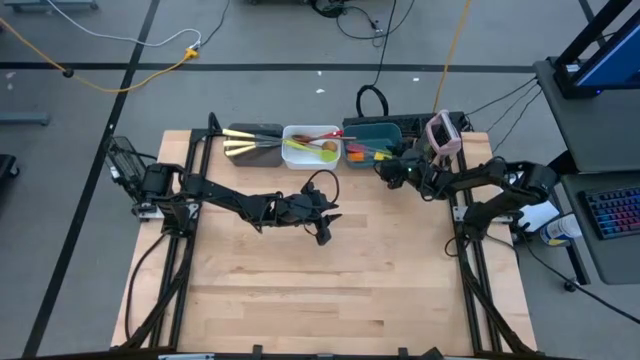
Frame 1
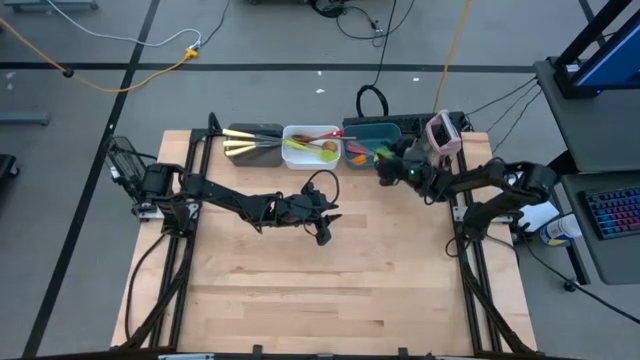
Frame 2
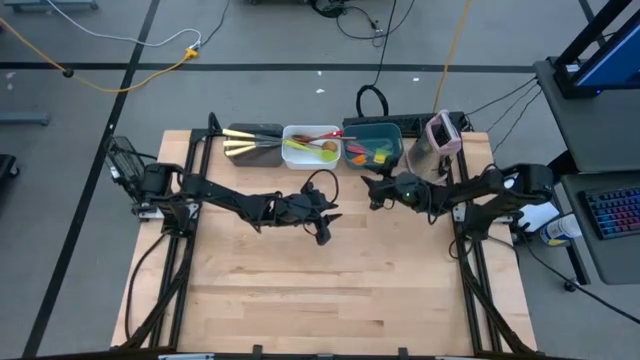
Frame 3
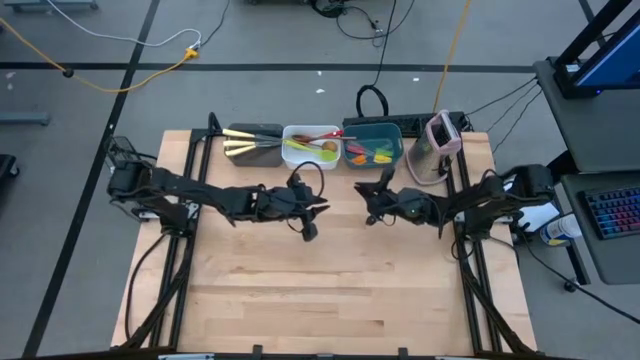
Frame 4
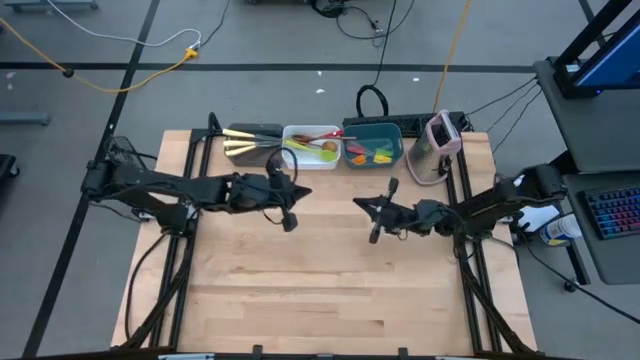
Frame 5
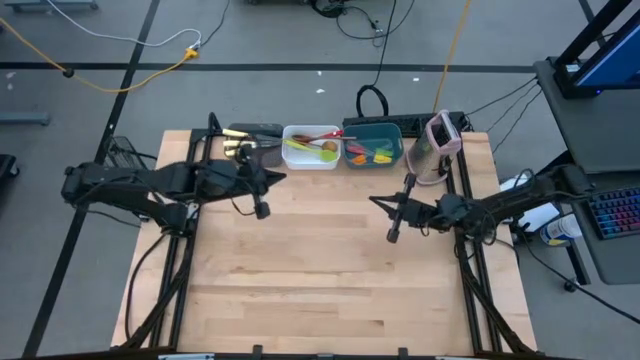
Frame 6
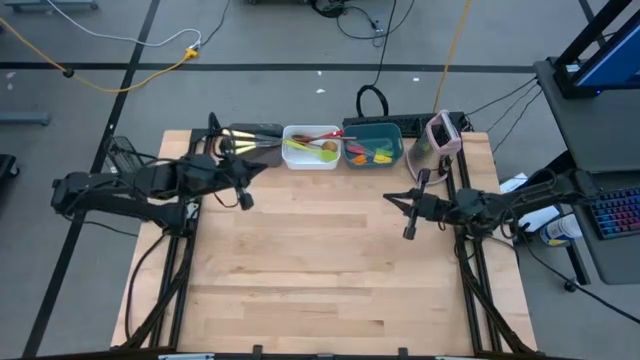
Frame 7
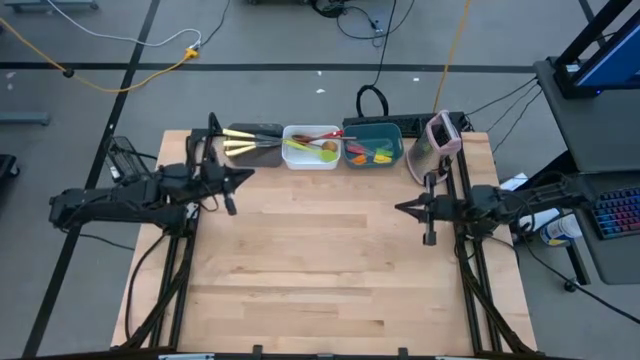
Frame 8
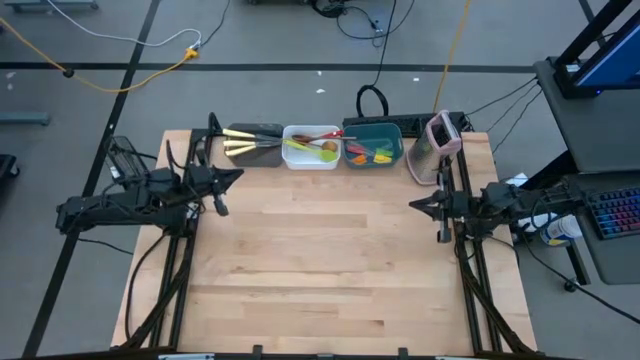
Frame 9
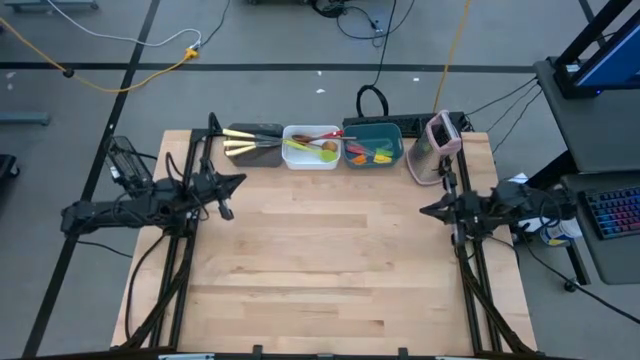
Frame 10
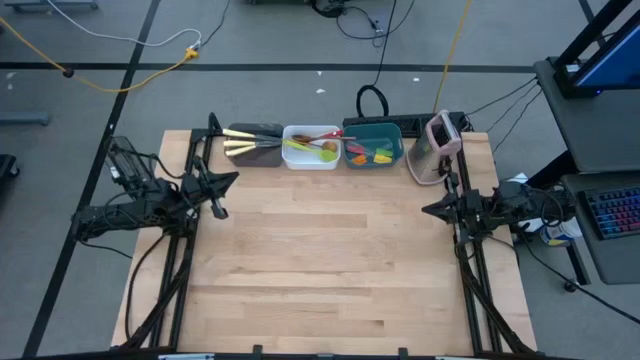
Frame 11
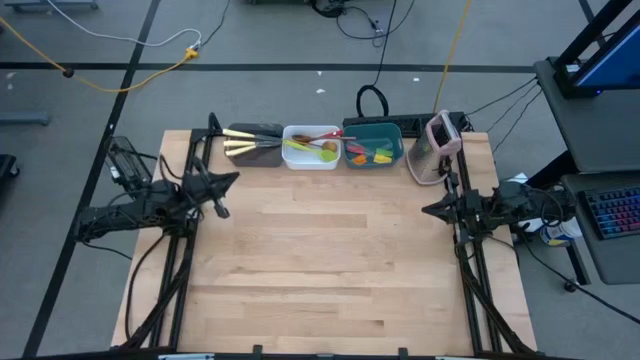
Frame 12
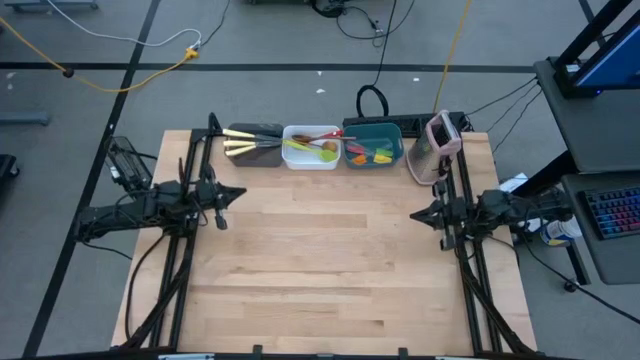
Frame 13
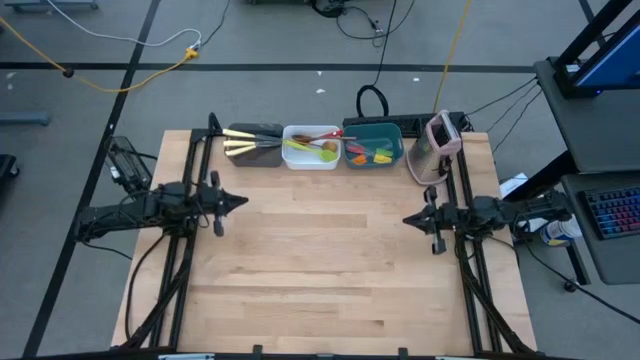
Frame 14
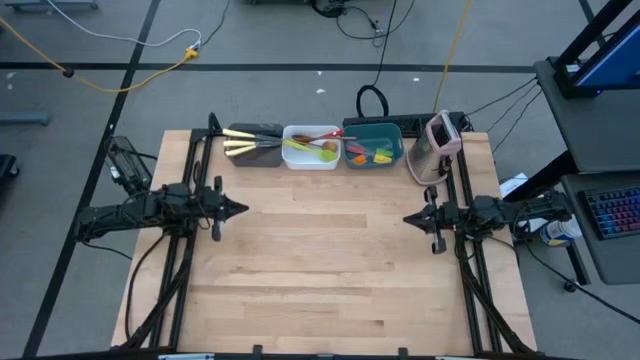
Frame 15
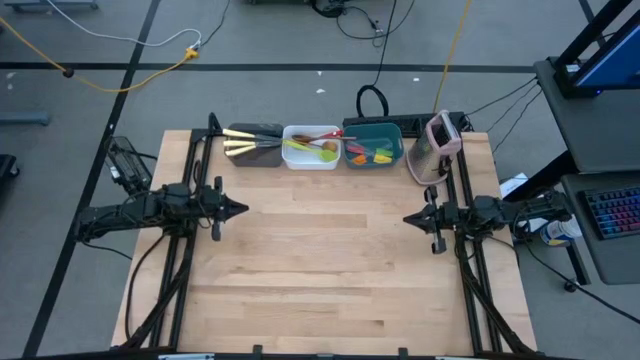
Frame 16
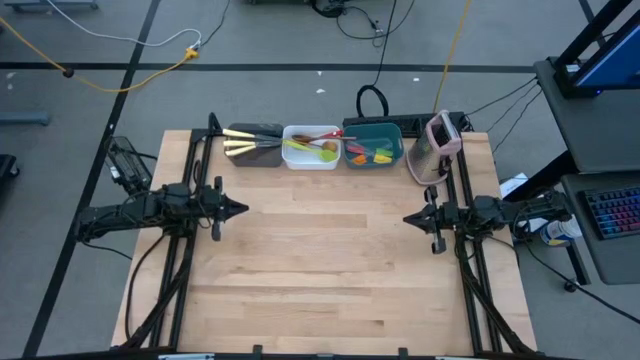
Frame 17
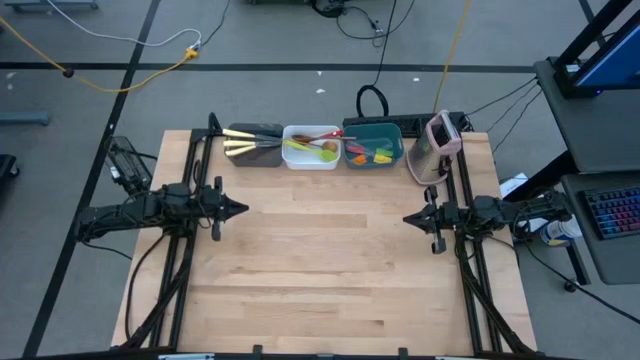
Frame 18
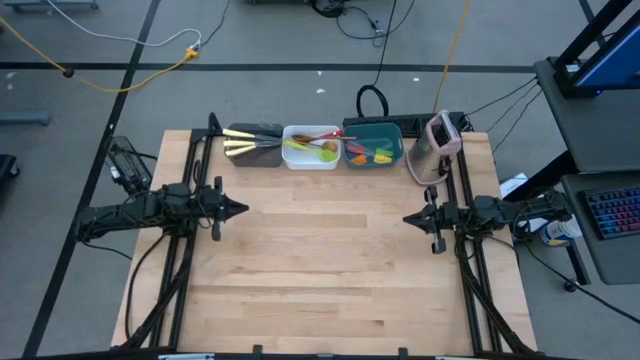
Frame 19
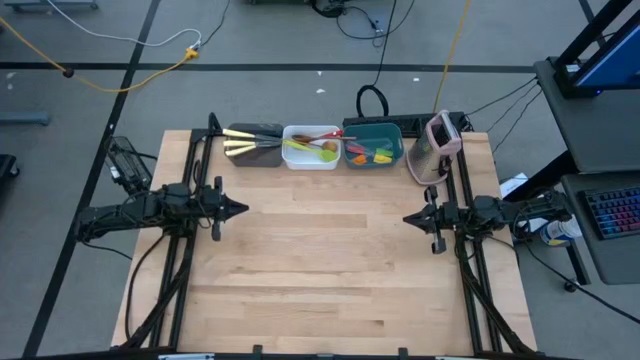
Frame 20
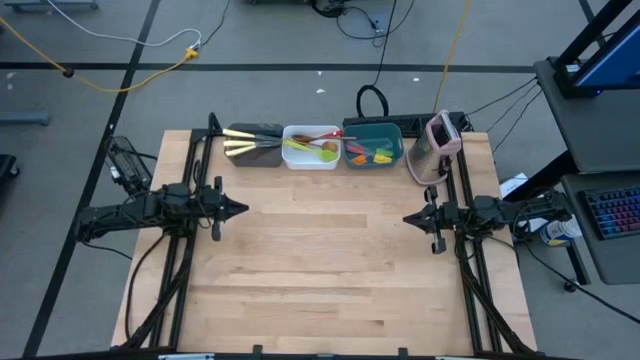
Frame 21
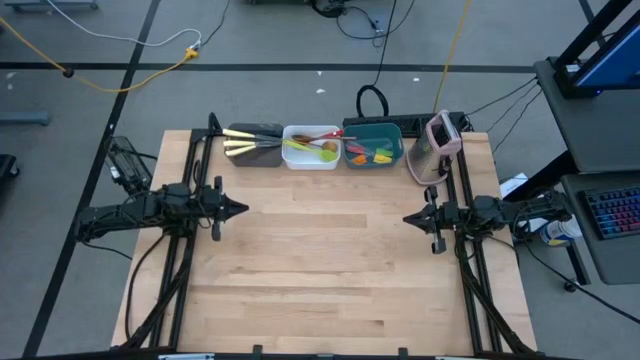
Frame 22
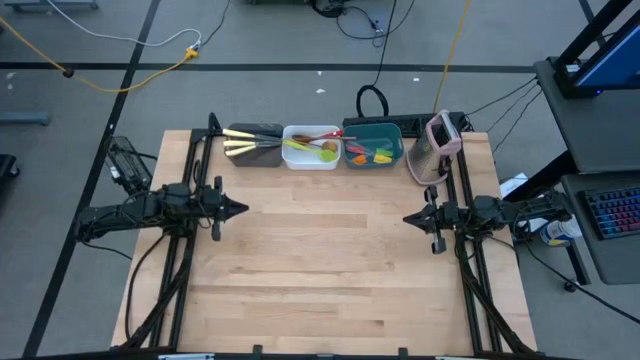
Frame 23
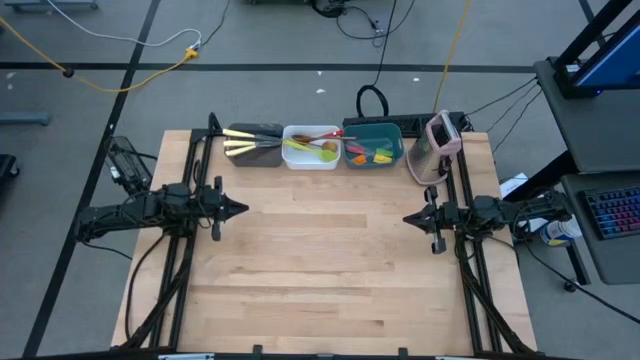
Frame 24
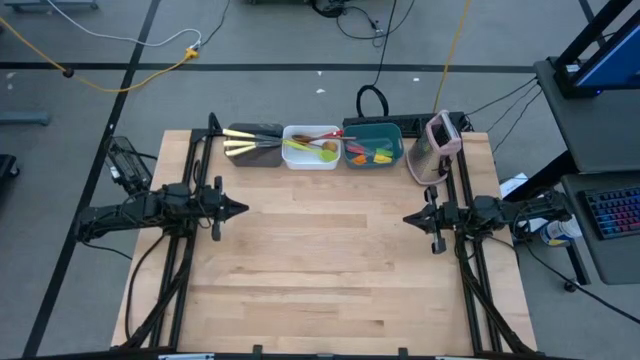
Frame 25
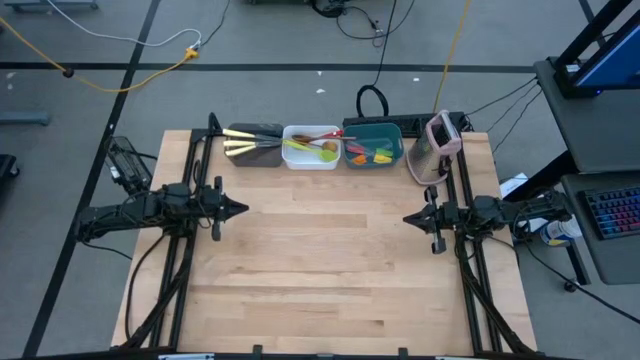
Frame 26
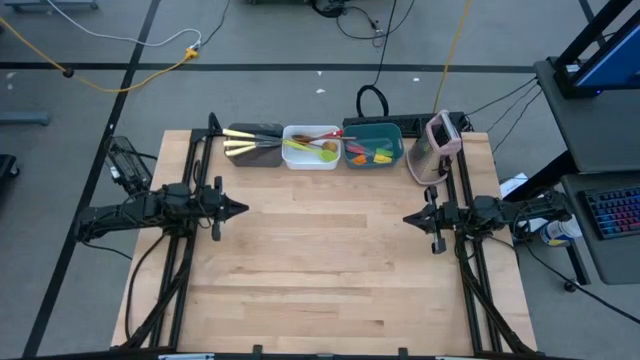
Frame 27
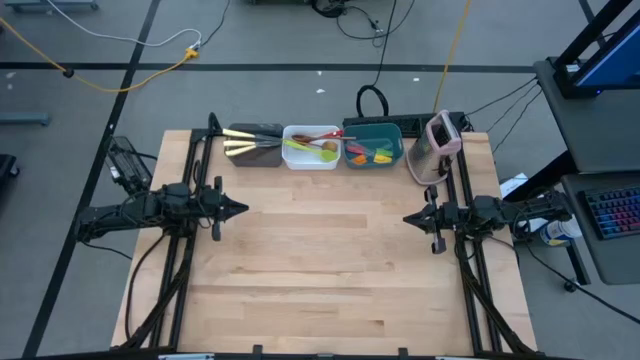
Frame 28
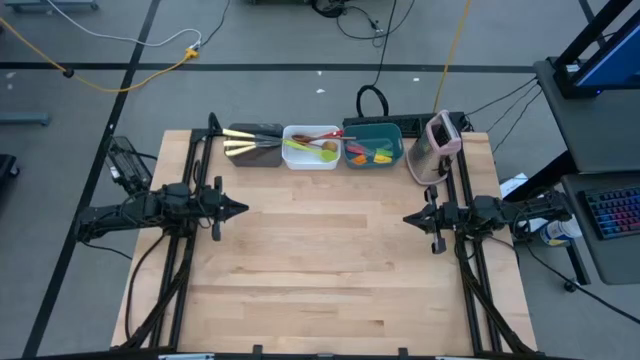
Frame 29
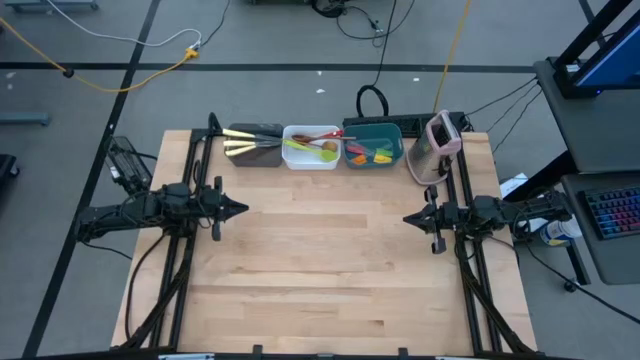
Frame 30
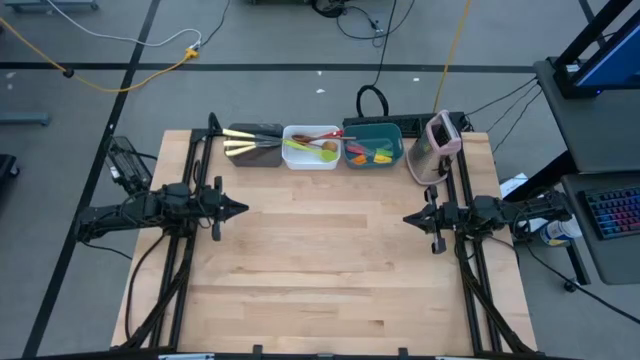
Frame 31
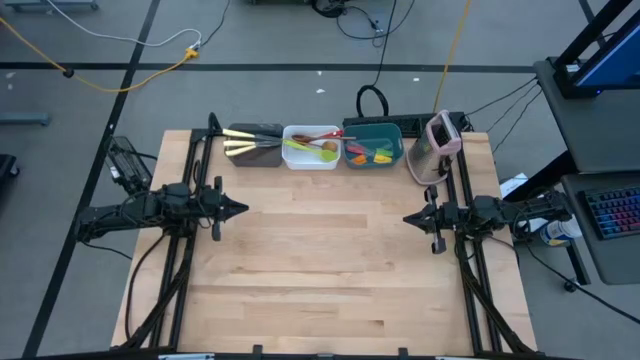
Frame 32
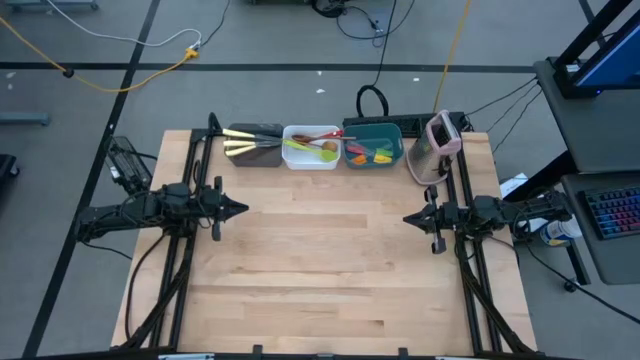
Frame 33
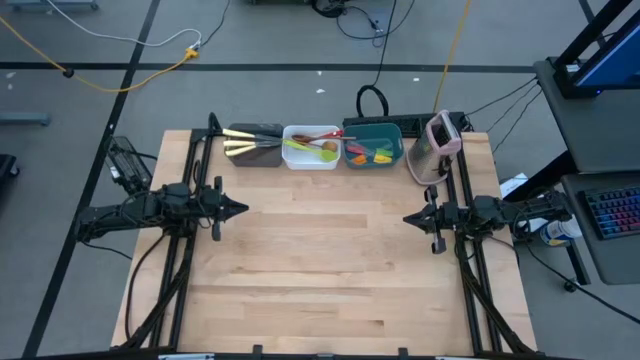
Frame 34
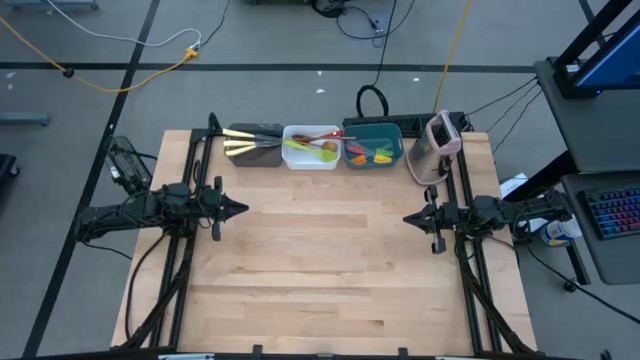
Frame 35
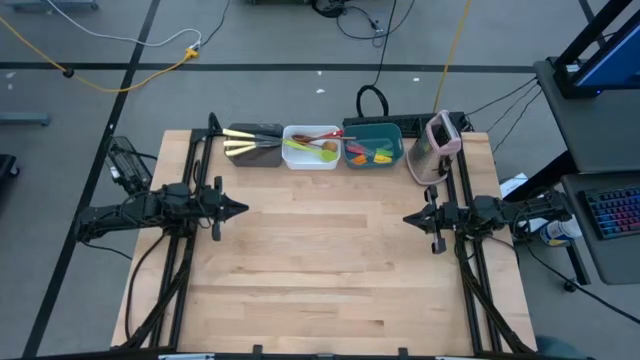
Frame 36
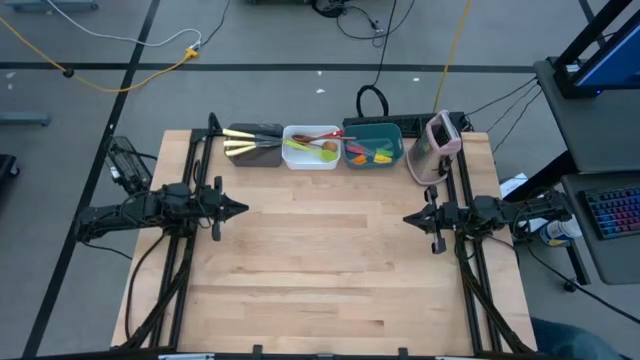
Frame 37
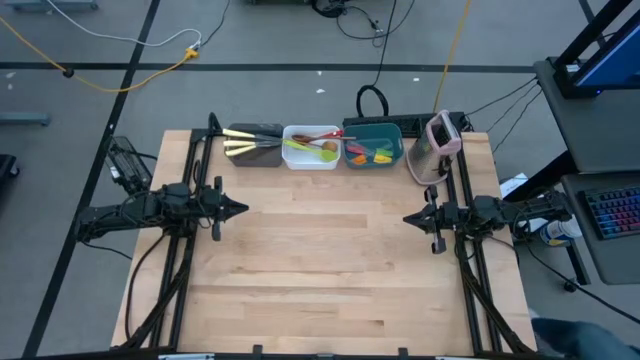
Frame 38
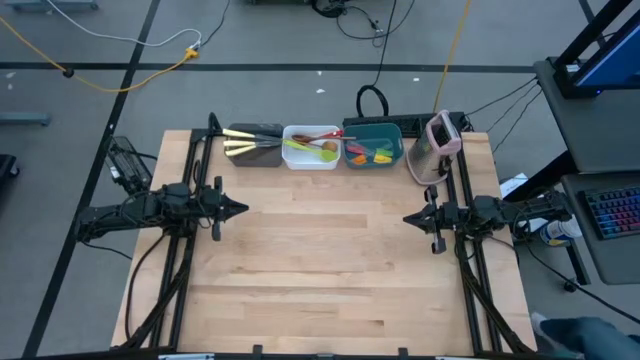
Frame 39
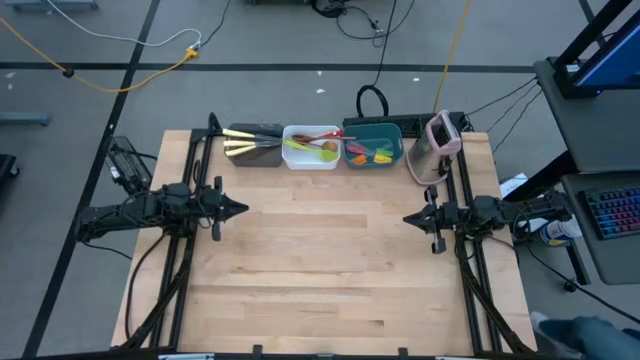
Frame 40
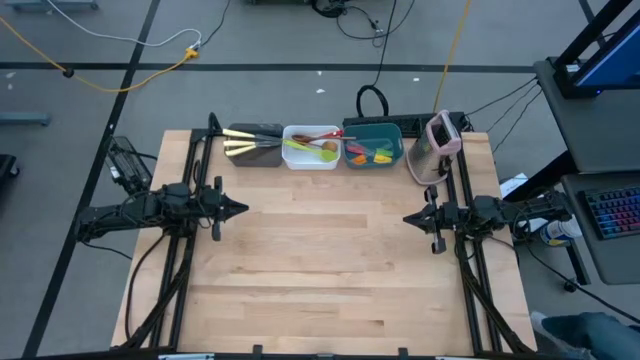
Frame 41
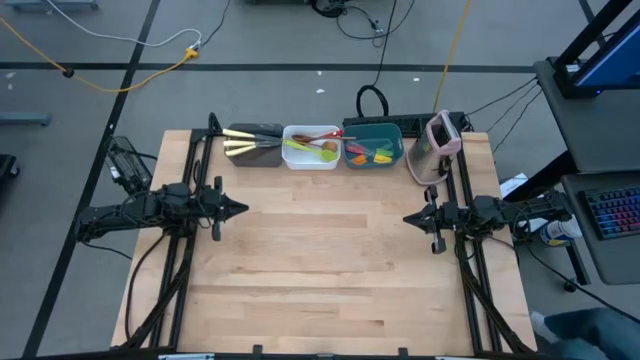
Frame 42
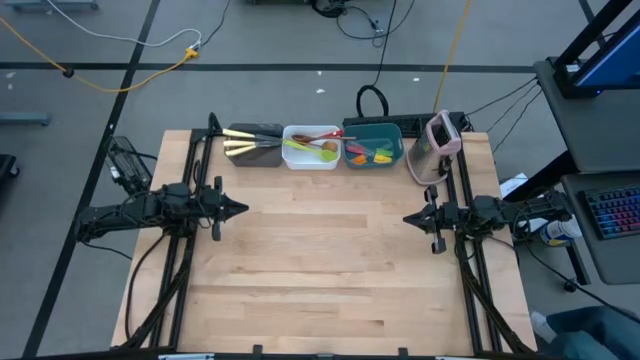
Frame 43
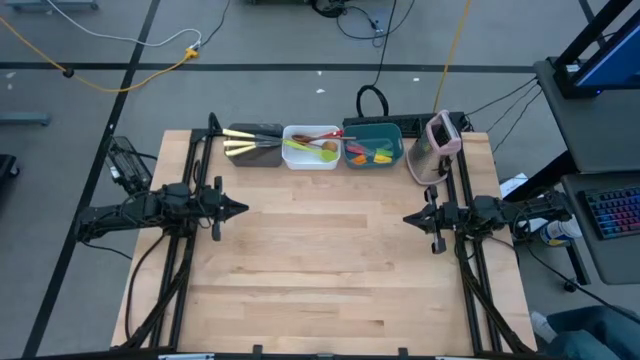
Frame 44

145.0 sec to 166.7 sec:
Task: Pick & Place Kitchen Items
Return to Home Position
